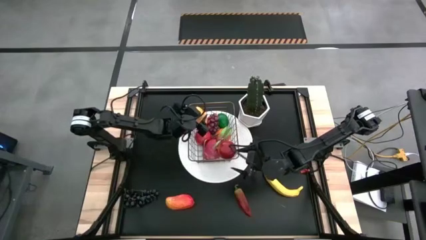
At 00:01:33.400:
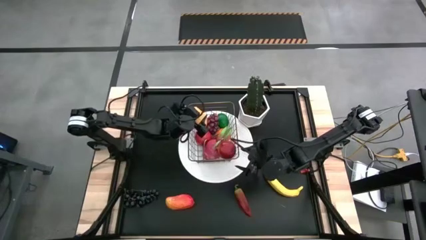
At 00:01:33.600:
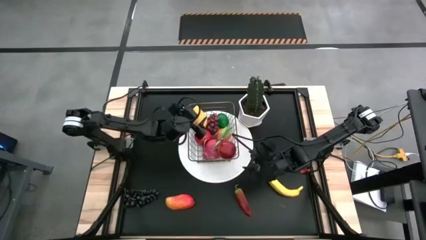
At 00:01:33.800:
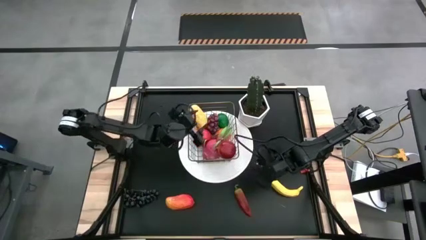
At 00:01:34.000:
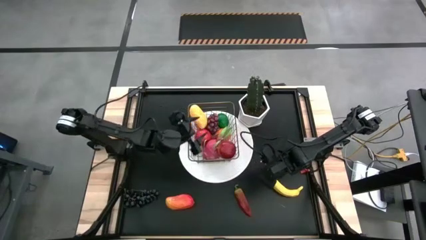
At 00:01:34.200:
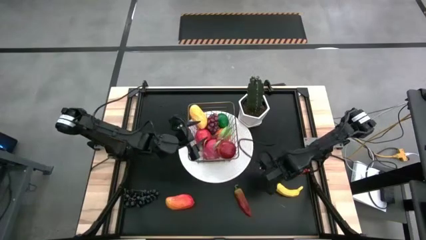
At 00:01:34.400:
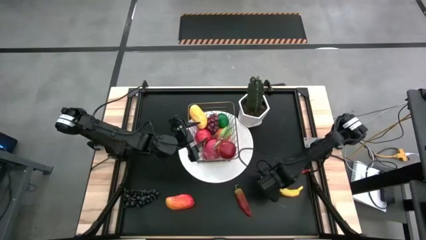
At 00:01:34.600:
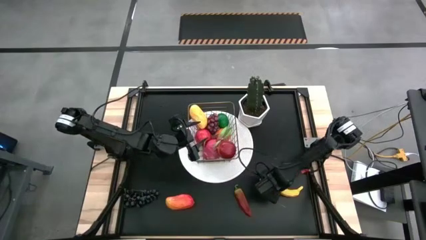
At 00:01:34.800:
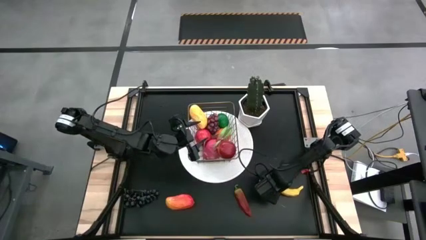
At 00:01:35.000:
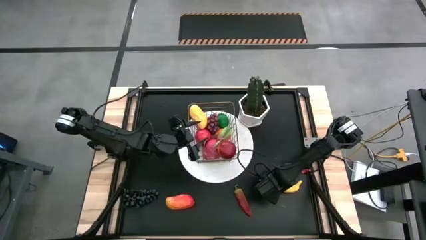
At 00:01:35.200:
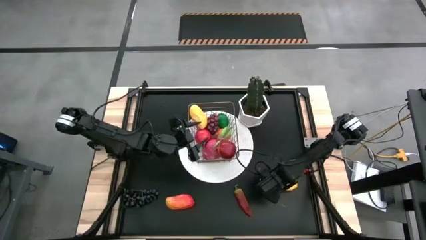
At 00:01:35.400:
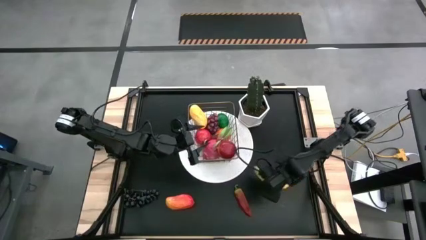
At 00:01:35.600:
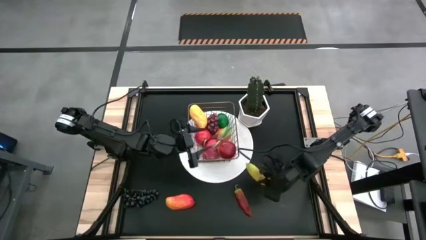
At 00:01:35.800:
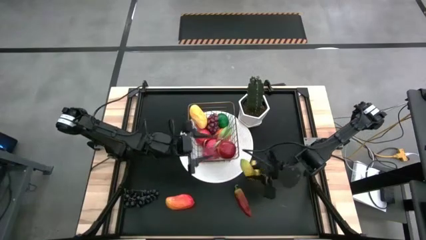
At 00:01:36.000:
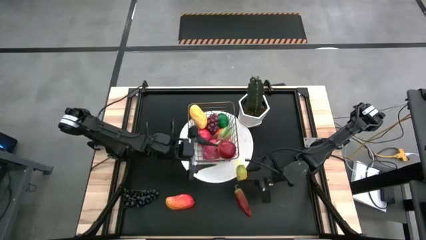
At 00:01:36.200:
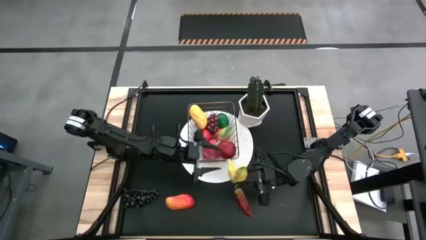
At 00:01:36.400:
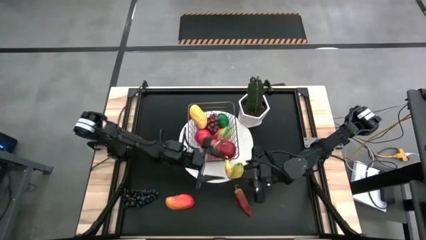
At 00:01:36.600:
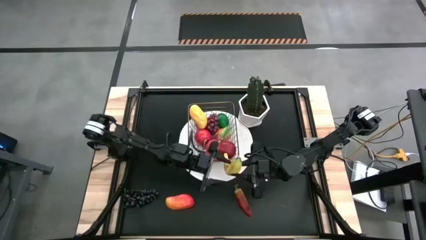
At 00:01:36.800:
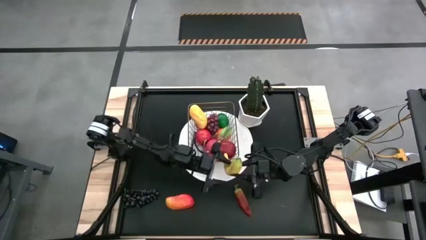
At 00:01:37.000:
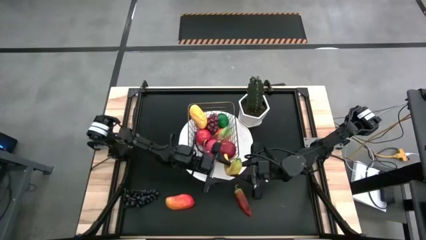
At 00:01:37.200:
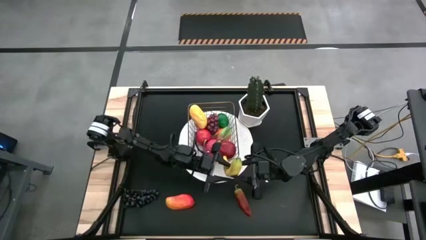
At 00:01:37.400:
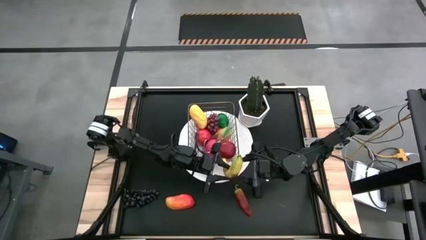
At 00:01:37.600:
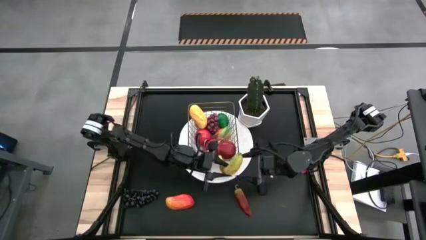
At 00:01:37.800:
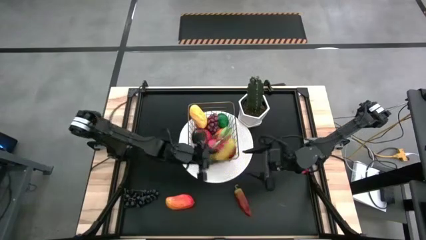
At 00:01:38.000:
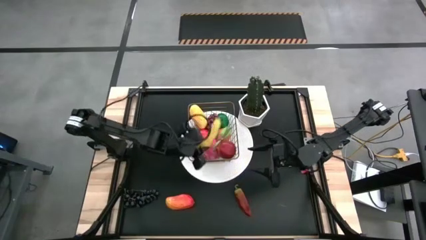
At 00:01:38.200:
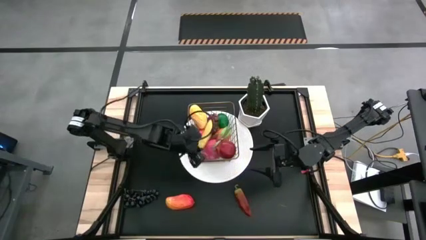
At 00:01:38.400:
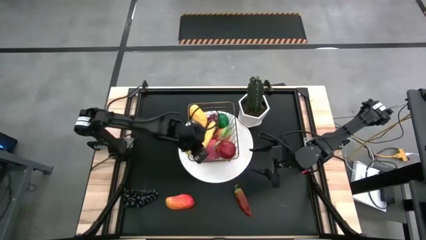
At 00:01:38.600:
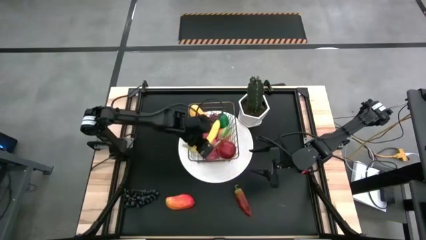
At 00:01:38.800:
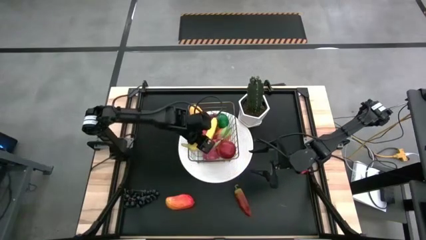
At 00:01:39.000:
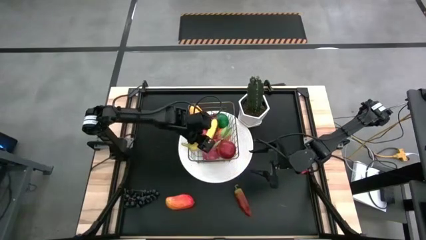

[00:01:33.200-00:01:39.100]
Task: Build produce basket
Put the banana into the gold wire basket

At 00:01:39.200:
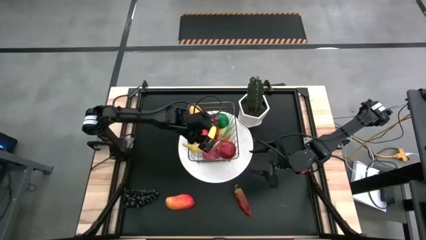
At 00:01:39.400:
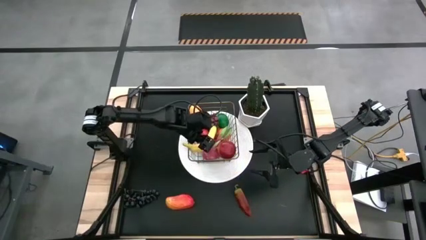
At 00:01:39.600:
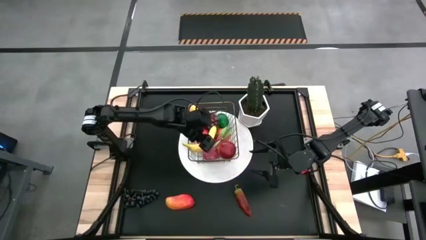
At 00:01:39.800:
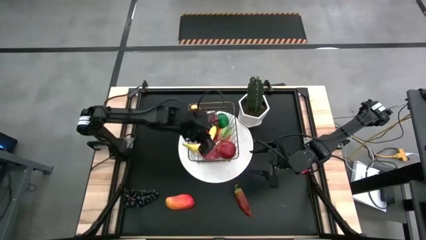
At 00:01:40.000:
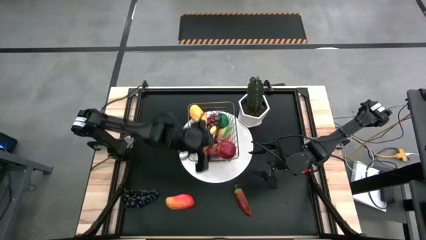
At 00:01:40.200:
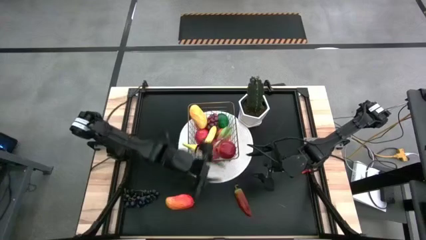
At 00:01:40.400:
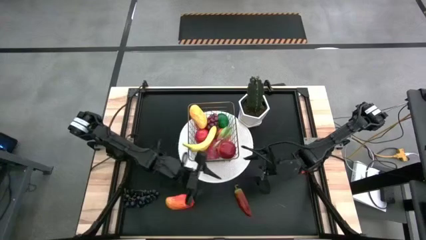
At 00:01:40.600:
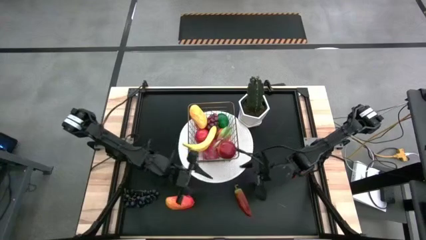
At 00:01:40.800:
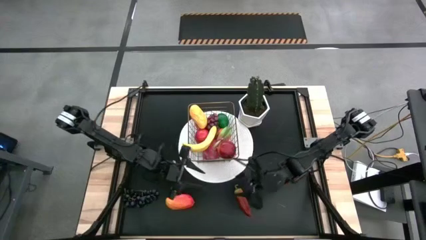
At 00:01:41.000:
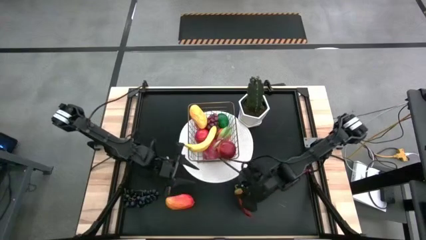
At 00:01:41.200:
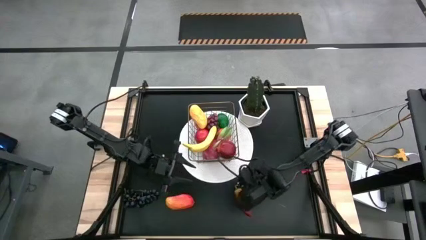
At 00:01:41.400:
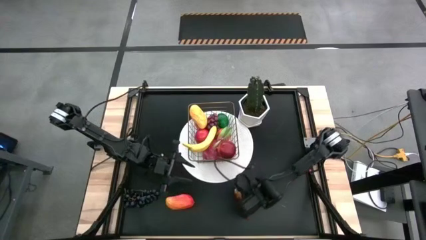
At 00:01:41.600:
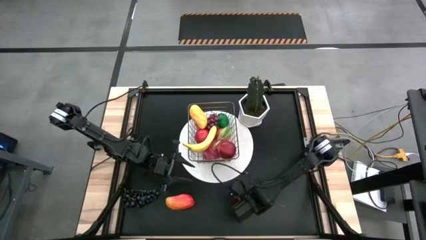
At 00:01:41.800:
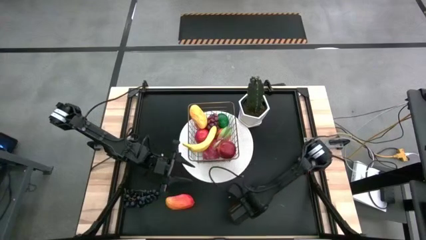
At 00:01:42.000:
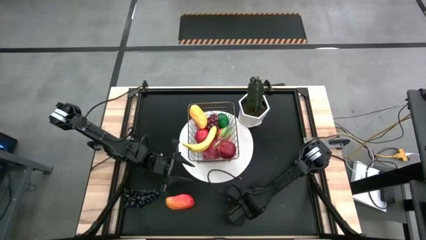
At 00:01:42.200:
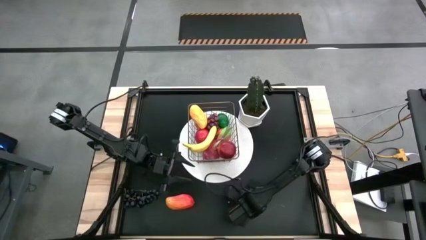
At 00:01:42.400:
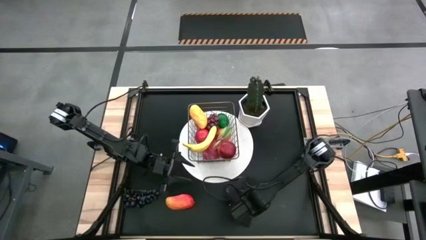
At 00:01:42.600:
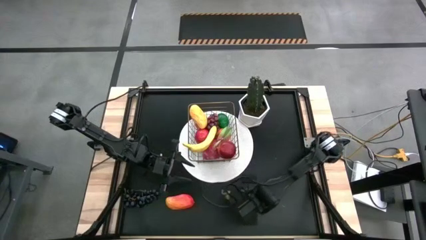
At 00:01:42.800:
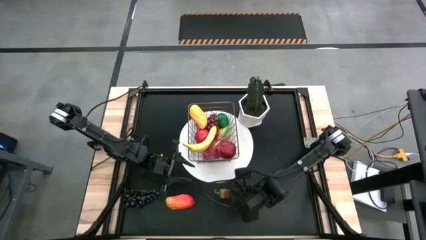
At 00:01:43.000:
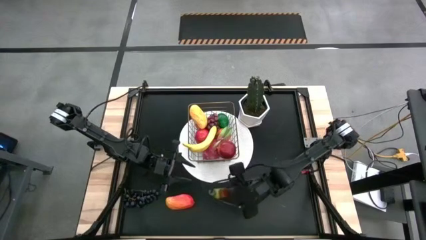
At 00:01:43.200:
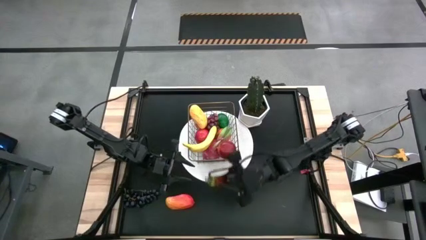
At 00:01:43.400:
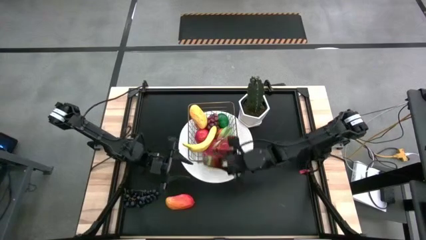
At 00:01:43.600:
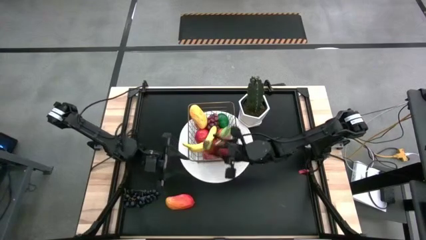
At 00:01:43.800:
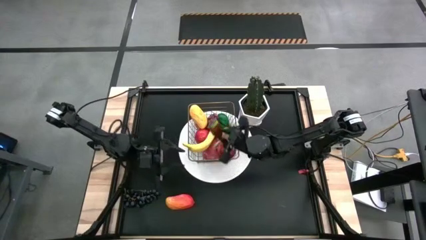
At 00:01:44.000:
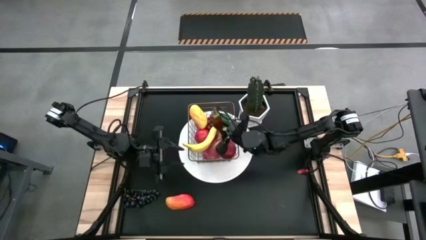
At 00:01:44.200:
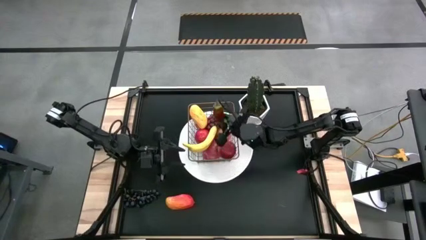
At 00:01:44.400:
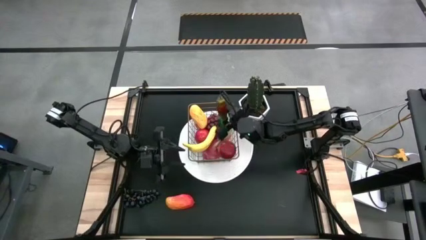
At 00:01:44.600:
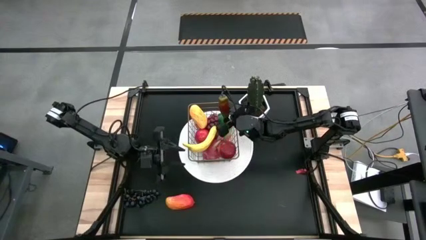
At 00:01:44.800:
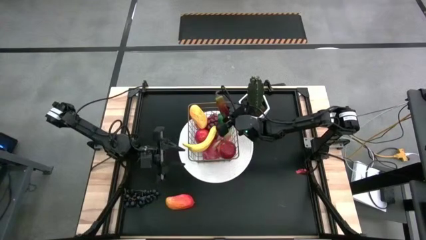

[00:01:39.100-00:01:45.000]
Put the red chili pepper into the gold wire basket

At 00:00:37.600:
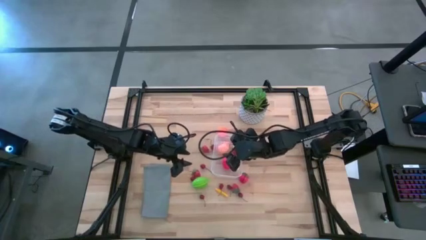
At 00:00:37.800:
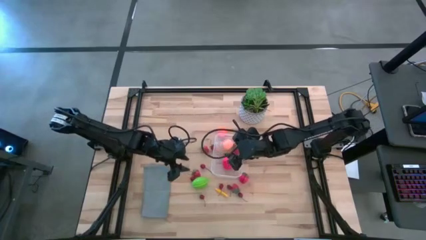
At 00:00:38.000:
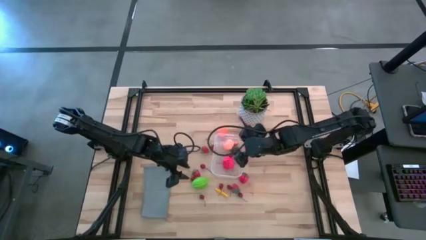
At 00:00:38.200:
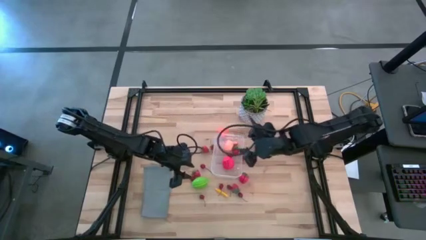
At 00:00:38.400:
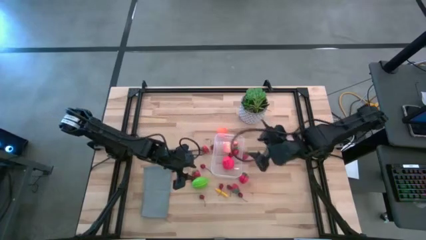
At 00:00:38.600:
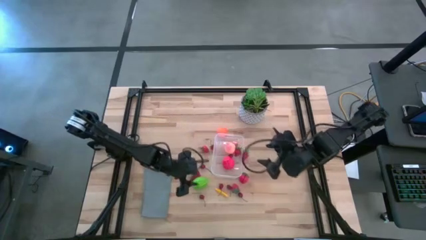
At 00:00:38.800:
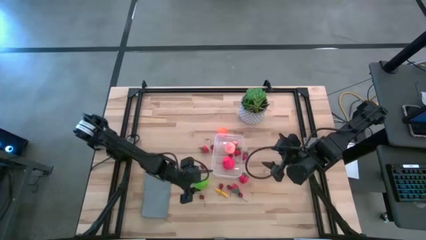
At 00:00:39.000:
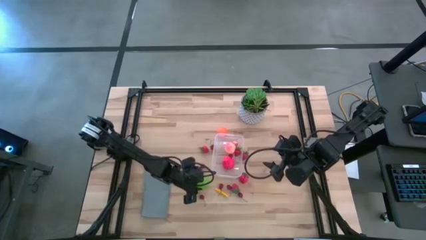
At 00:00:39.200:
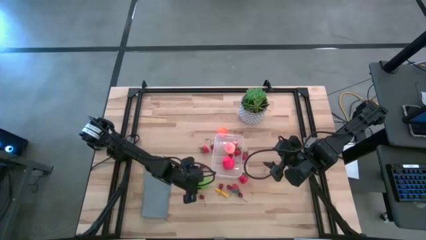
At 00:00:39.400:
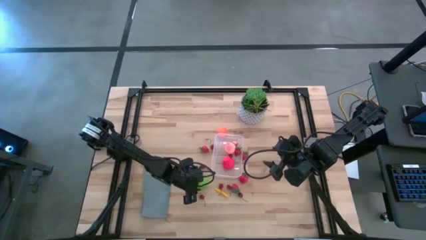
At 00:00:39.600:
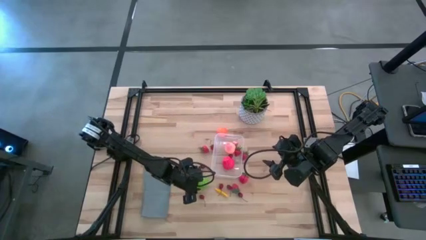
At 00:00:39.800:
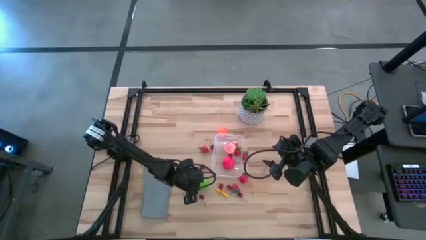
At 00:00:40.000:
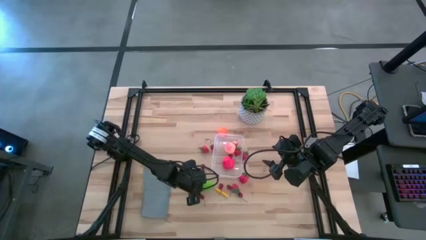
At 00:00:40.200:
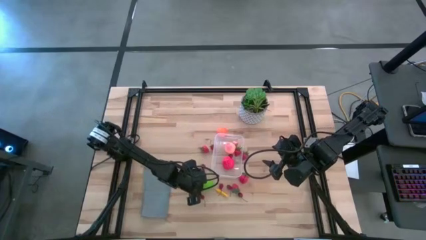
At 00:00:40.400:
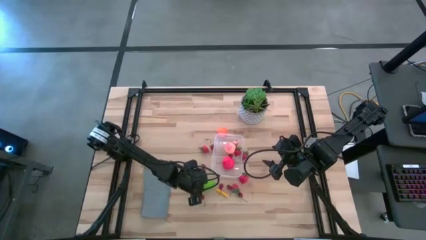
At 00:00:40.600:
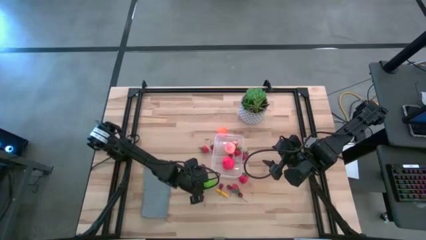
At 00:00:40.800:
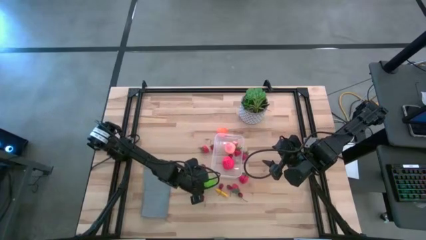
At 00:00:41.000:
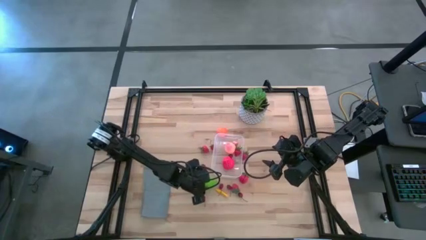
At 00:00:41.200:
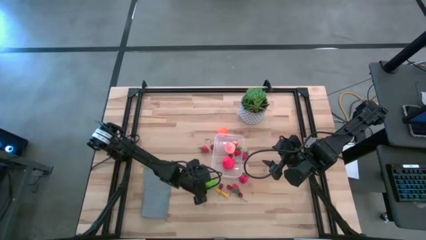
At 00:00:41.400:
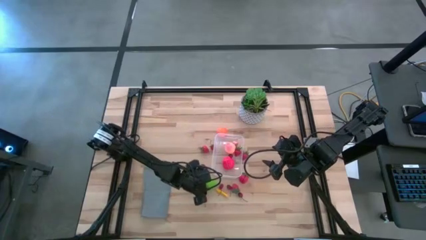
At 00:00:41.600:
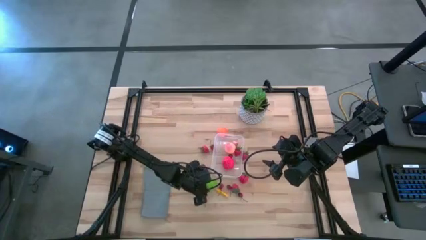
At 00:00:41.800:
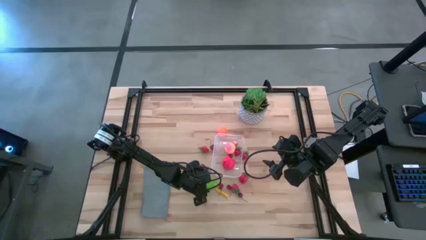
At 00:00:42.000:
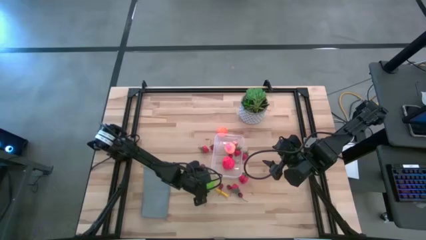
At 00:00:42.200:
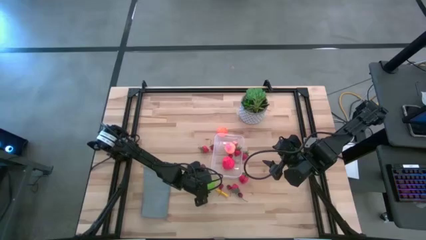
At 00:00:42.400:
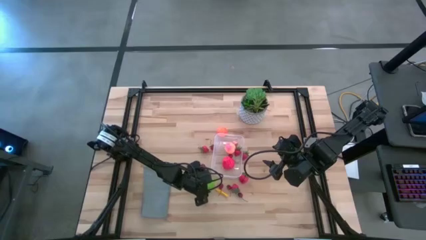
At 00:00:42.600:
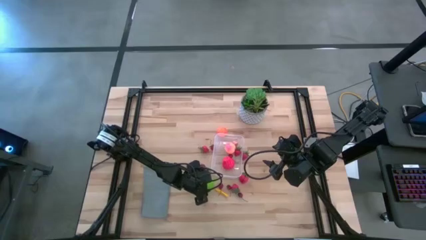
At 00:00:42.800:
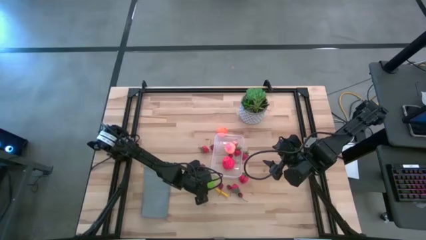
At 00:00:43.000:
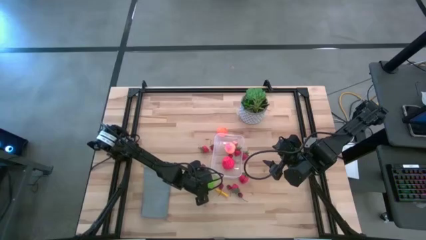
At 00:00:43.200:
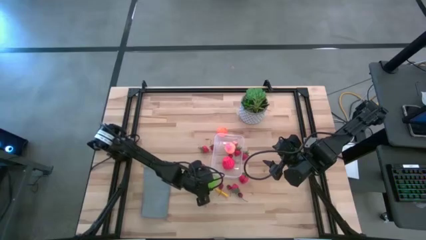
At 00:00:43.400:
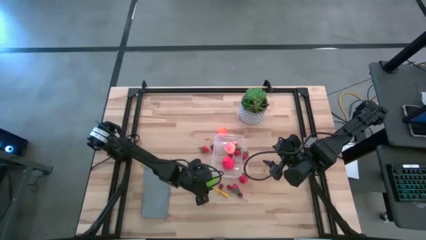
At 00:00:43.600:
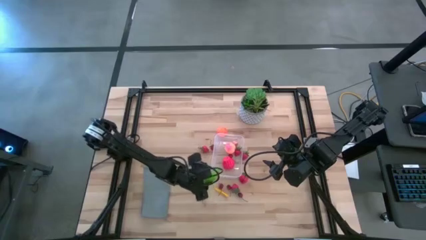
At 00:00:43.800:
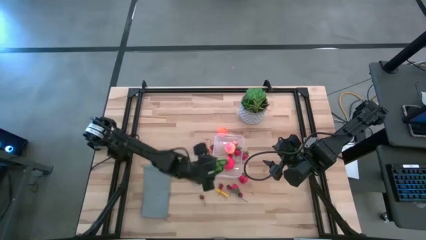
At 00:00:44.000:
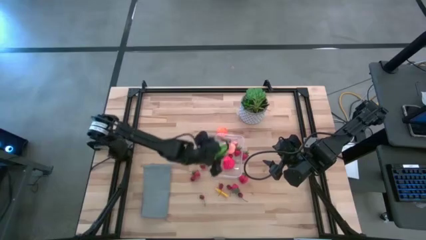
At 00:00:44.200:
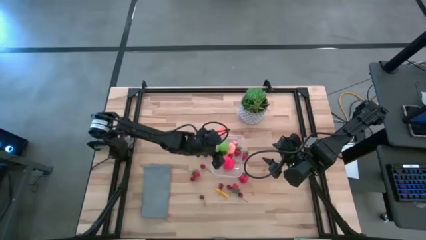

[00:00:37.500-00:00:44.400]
Task: Pick and placing Produce into tupperware
Put the green melon into the transparent bin
